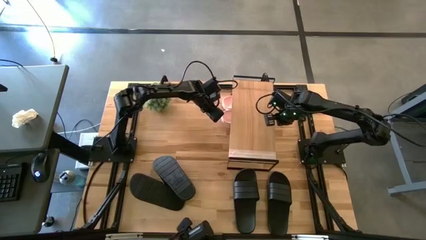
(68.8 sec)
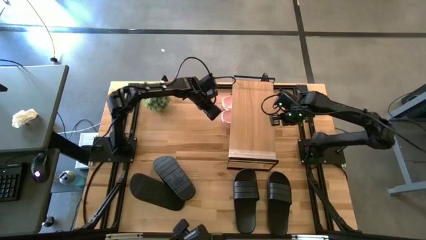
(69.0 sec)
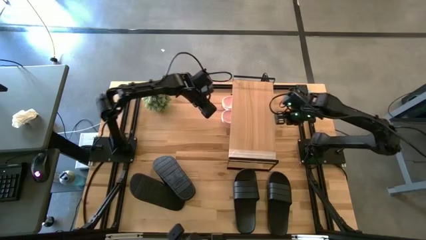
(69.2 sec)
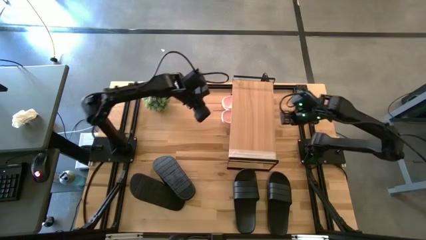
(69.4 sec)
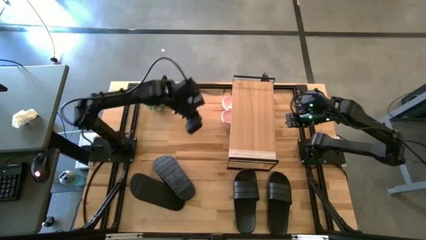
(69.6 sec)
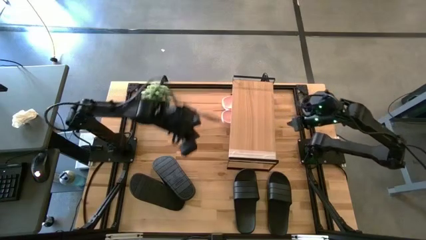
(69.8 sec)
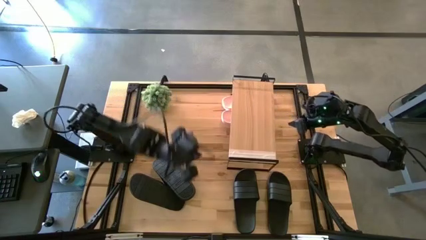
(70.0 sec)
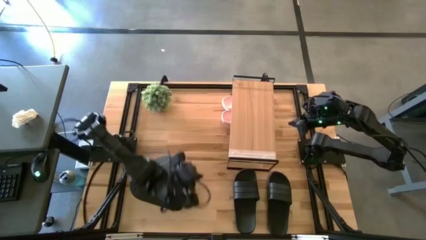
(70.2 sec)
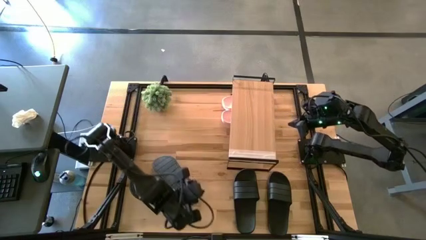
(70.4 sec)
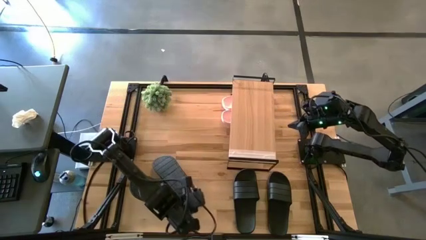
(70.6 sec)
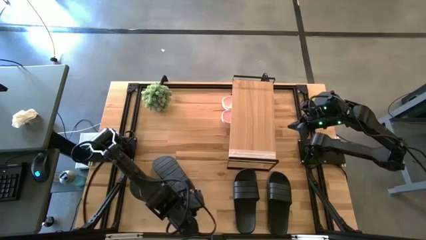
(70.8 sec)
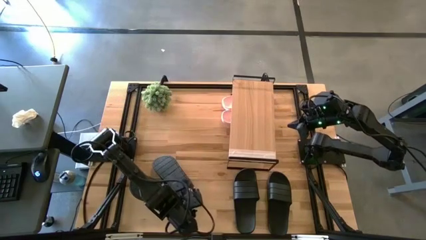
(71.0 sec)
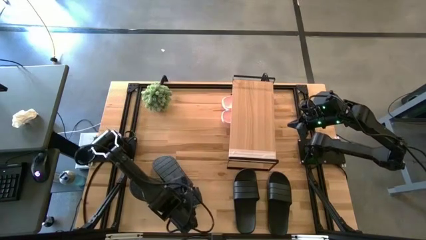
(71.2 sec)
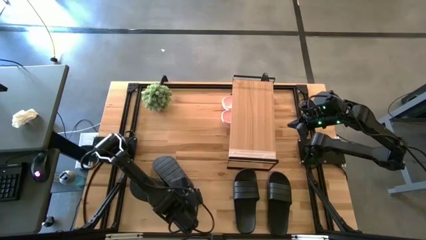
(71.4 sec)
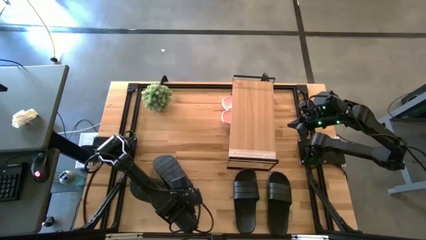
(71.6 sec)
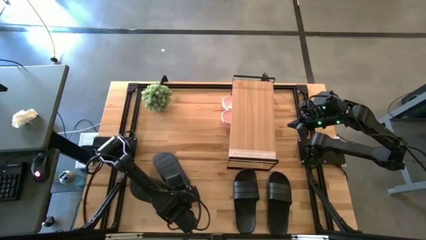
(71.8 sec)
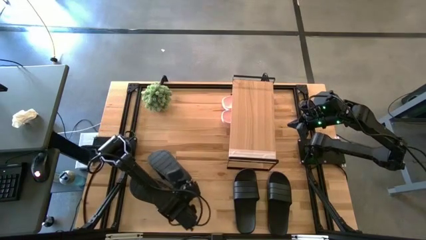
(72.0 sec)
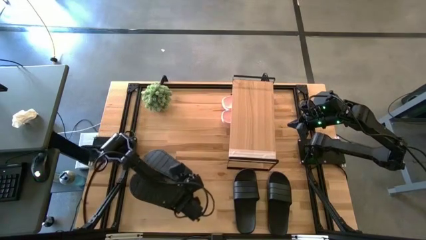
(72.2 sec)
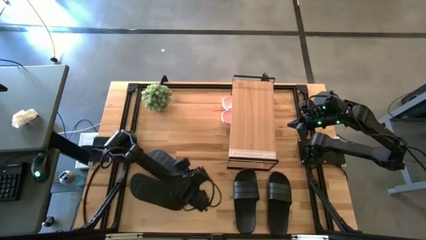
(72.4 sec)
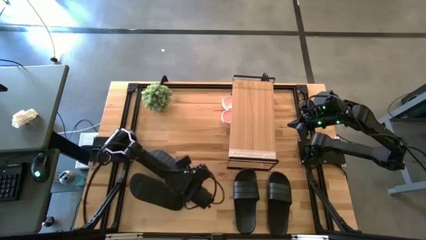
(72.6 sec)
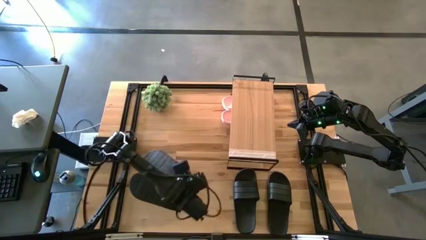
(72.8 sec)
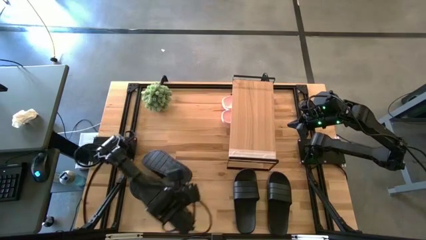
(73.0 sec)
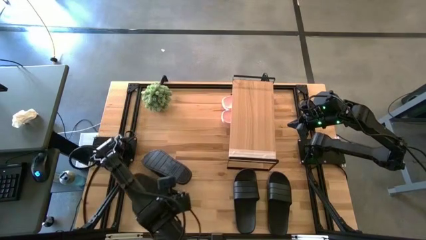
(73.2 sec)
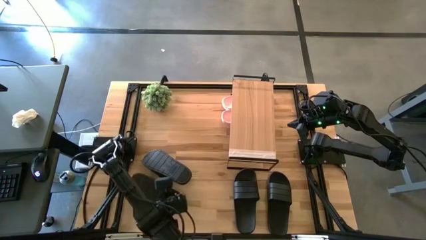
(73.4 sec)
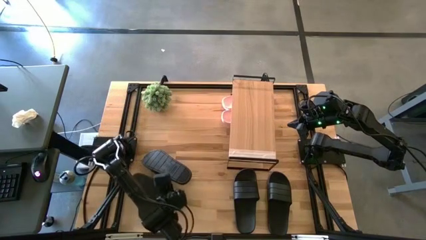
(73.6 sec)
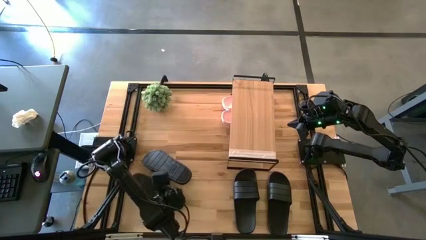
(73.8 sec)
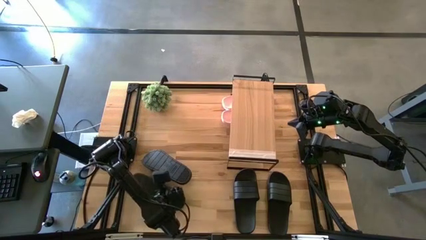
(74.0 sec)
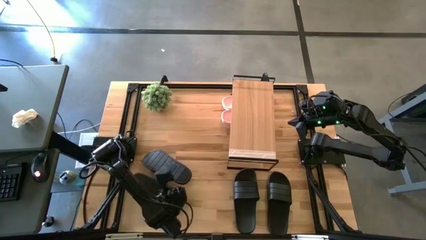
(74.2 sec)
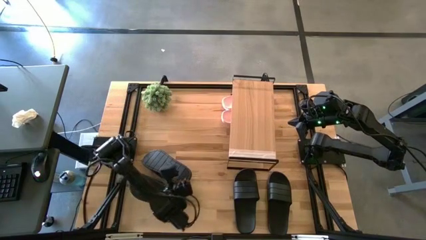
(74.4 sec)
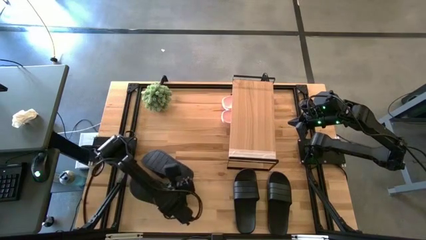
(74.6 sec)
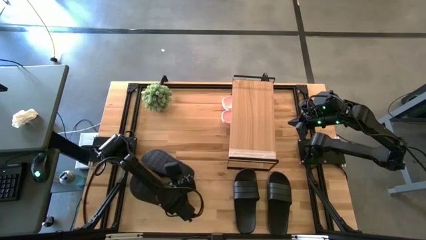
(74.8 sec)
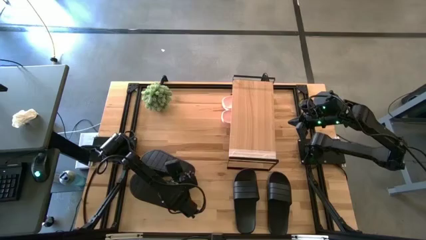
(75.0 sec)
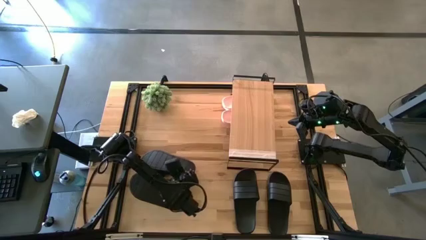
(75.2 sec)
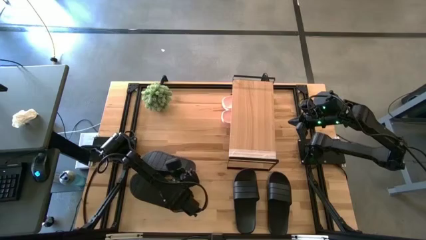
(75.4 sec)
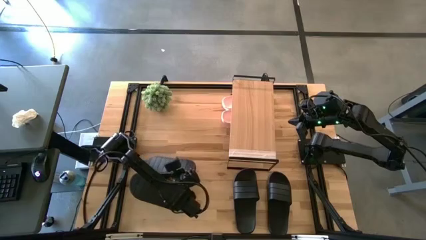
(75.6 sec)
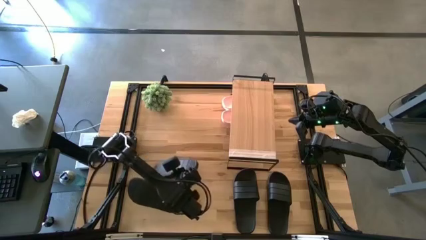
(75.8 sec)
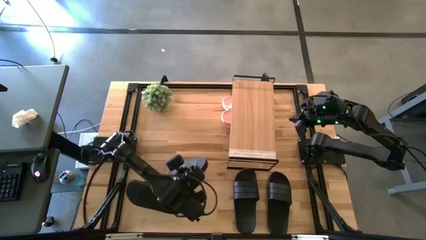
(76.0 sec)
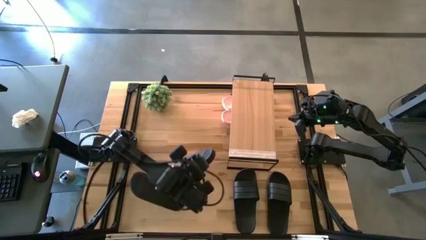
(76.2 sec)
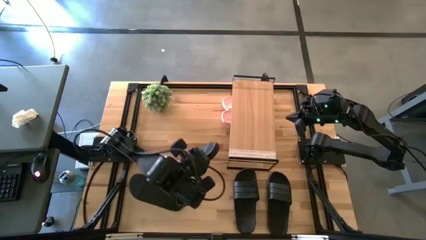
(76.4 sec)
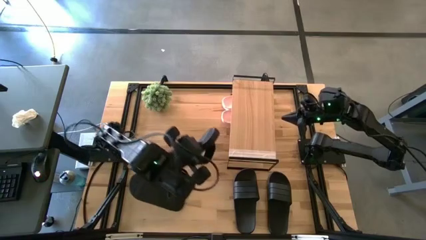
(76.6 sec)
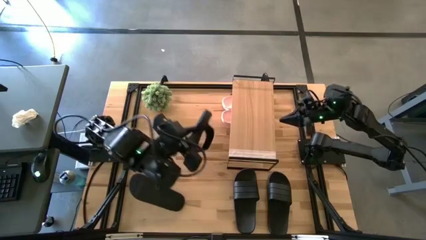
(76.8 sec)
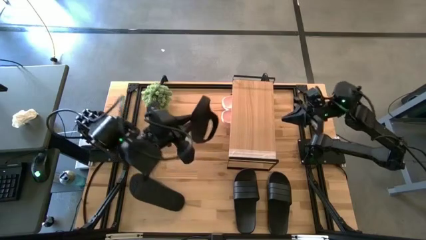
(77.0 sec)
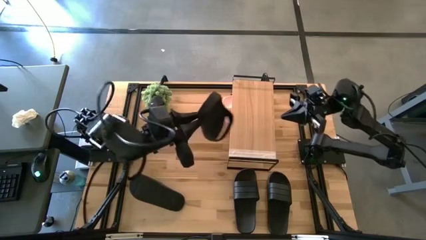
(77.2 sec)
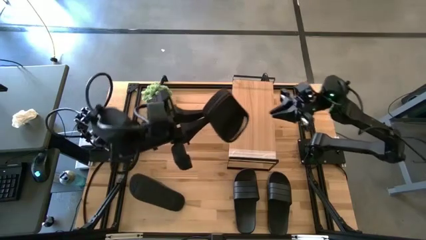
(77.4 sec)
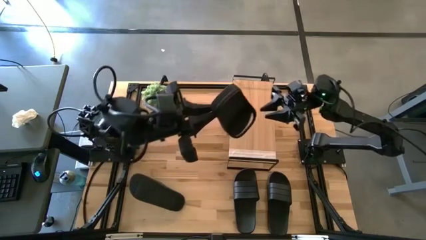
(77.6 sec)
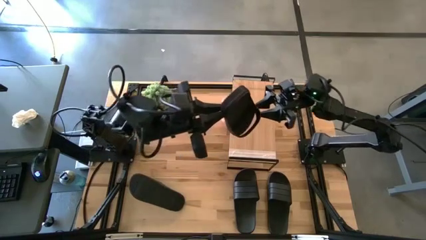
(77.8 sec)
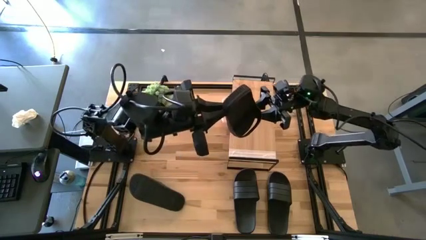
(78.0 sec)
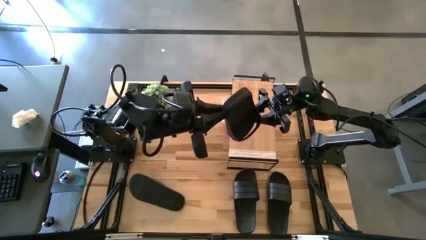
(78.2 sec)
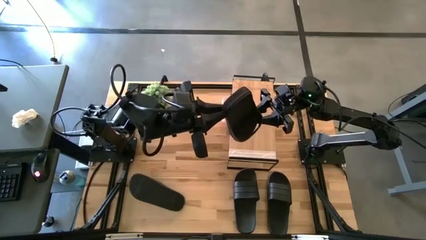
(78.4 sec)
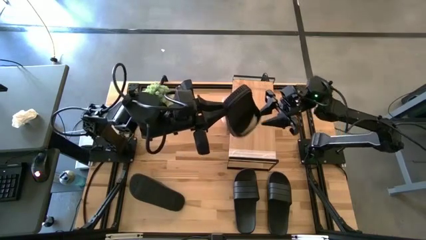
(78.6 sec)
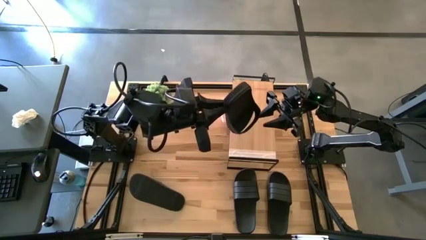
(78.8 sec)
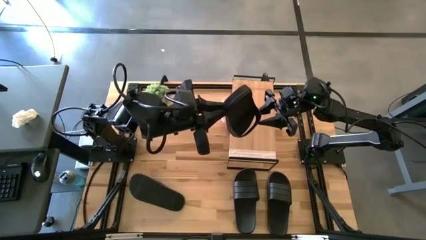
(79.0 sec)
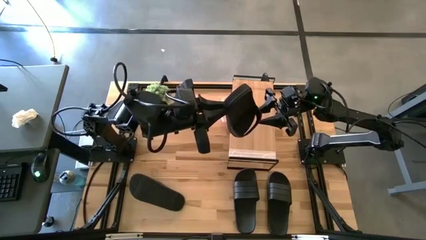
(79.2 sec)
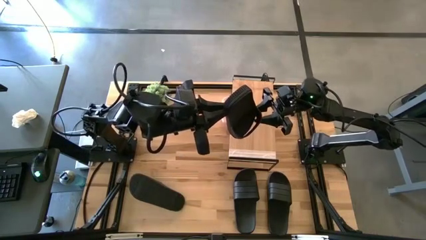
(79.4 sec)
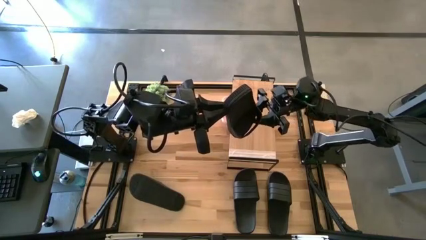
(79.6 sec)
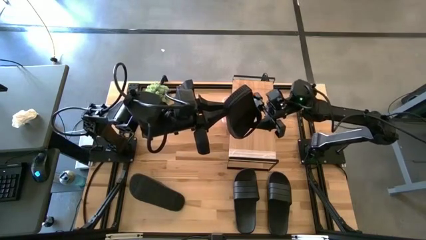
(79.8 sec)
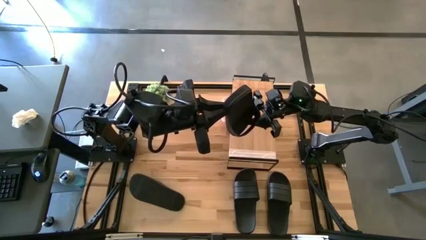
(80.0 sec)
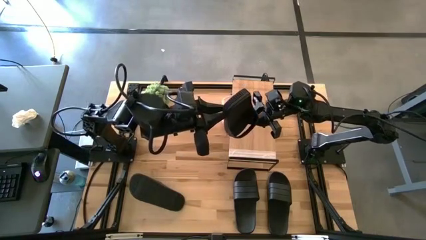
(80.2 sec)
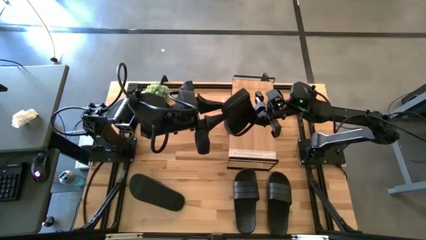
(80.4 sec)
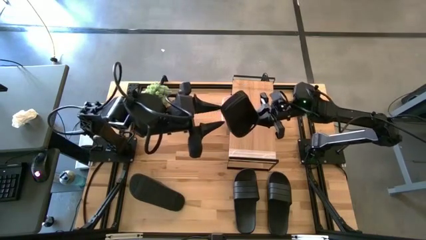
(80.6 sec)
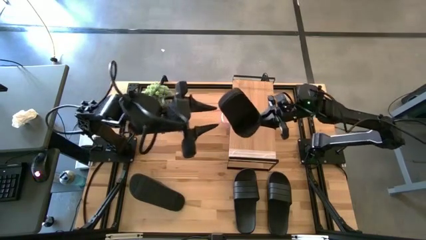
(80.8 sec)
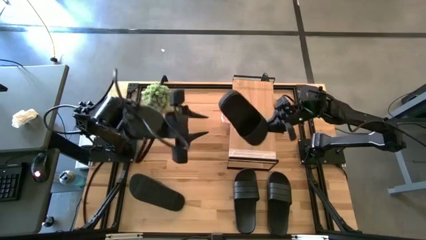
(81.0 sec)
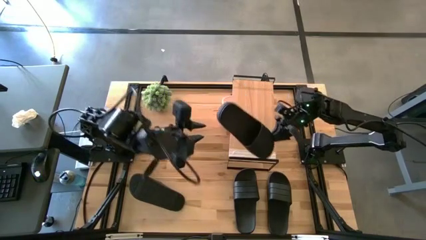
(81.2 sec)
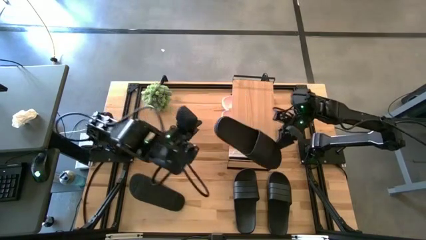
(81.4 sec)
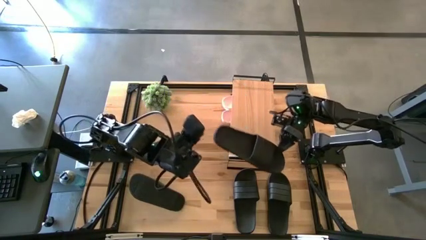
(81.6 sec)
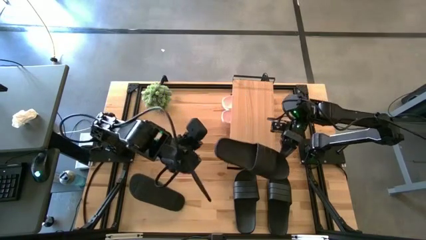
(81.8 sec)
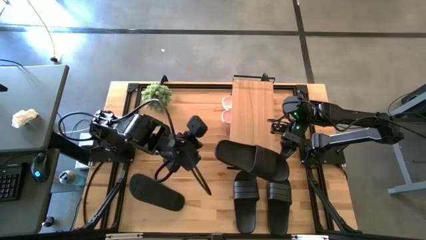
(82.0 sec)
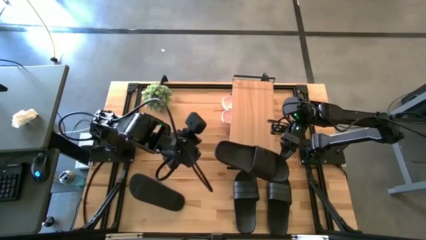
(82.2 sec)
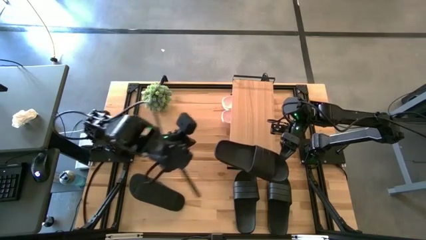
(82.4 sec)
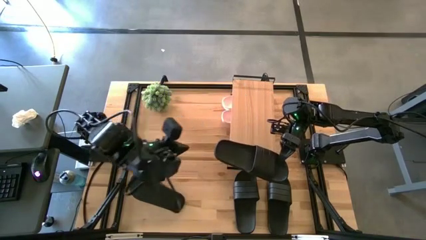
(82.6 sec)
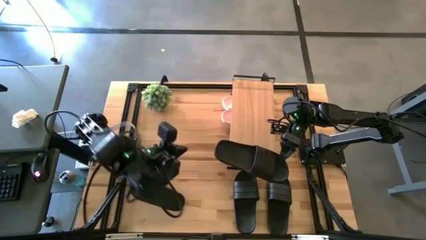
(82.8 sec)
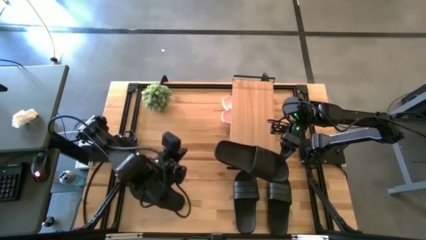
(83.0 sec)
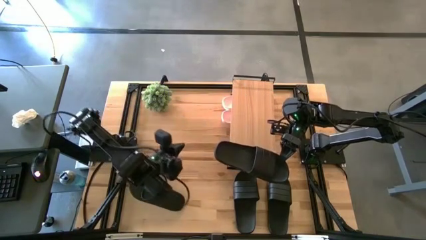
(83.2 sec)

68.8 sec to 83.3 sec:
Task: Pick and place slides into the shelf
Put the black slipper under the shelf
